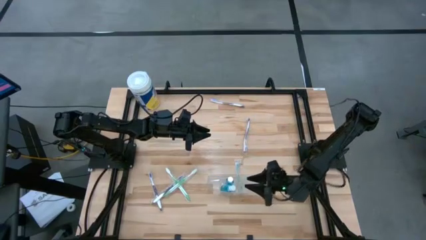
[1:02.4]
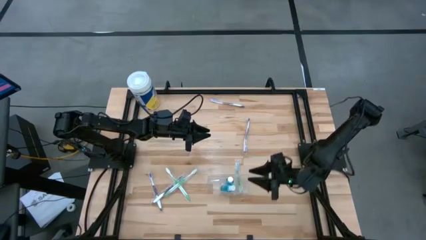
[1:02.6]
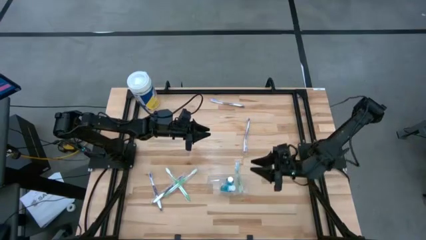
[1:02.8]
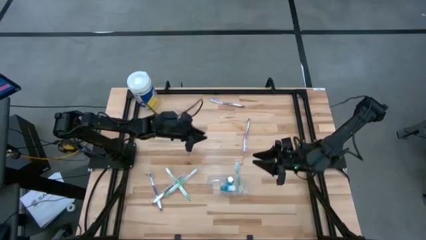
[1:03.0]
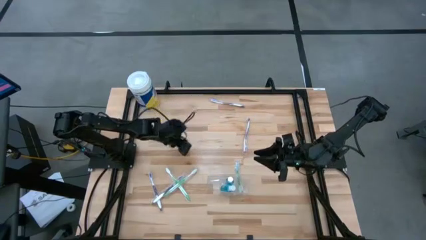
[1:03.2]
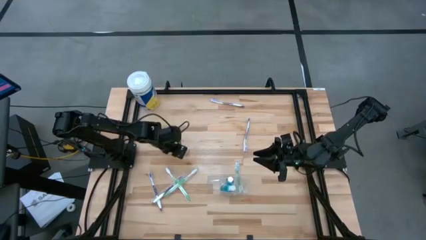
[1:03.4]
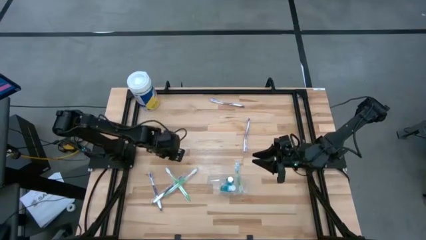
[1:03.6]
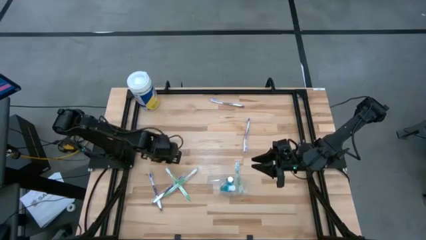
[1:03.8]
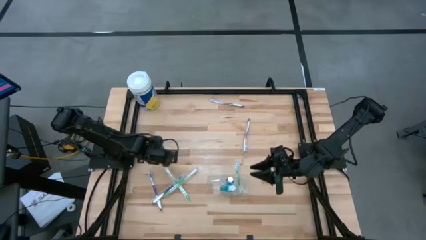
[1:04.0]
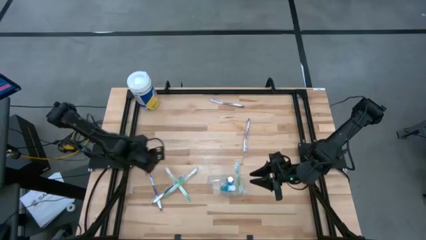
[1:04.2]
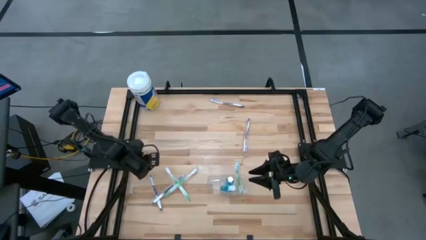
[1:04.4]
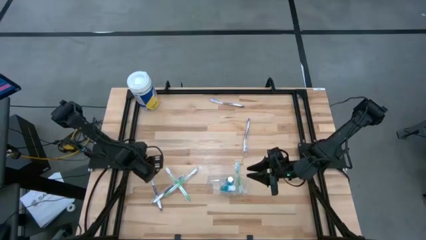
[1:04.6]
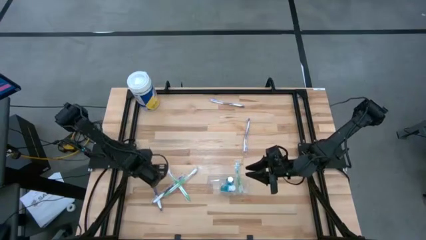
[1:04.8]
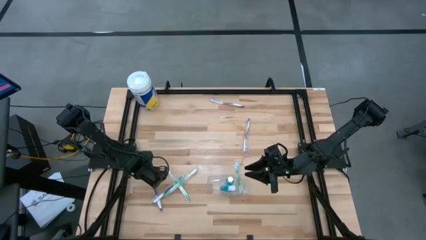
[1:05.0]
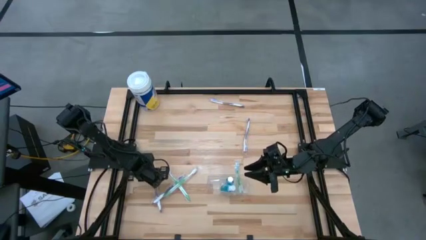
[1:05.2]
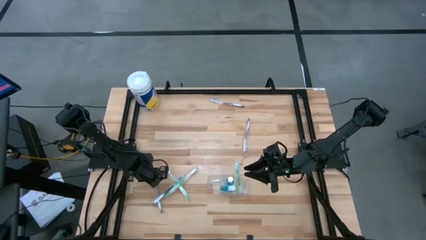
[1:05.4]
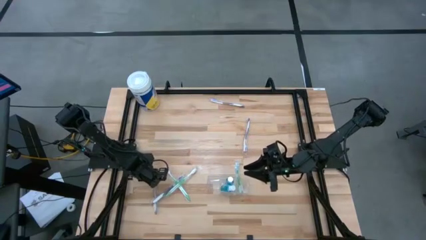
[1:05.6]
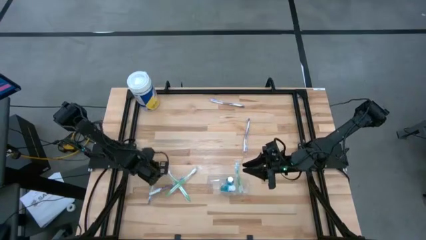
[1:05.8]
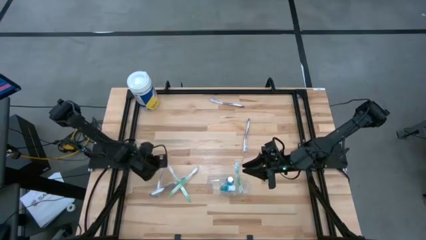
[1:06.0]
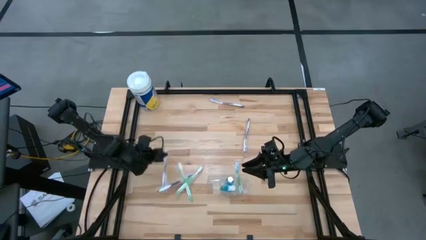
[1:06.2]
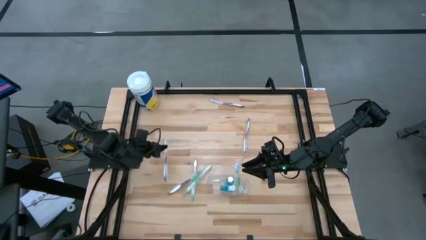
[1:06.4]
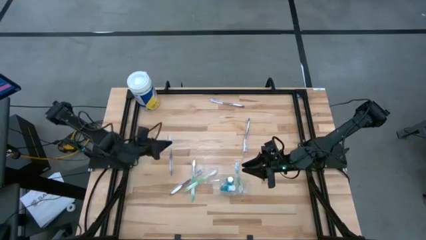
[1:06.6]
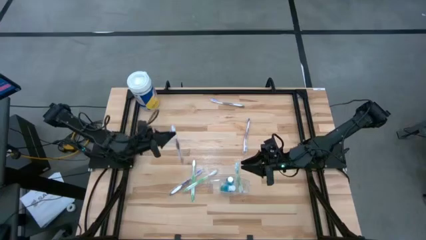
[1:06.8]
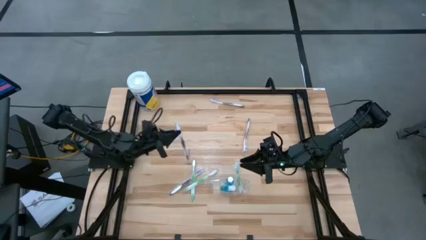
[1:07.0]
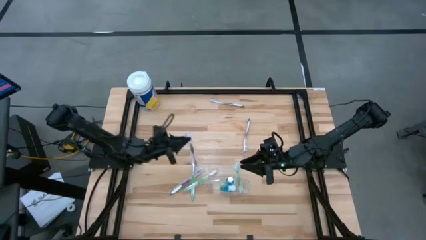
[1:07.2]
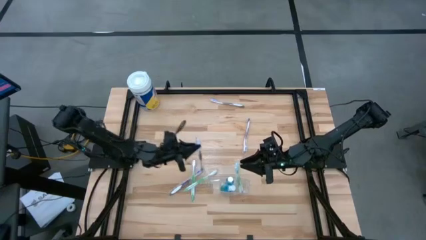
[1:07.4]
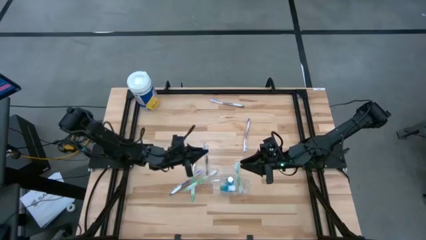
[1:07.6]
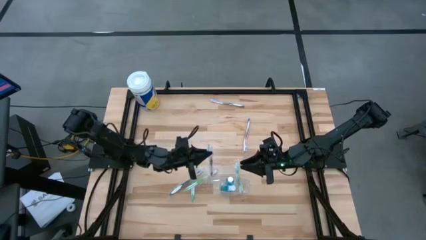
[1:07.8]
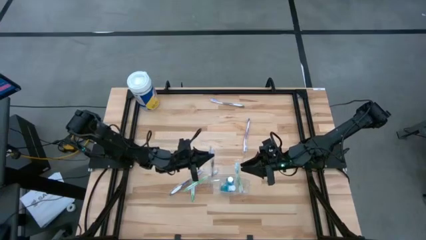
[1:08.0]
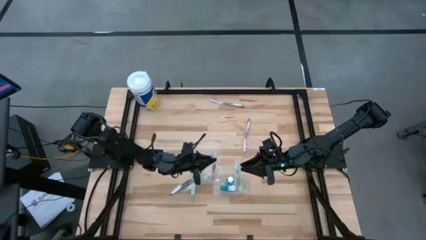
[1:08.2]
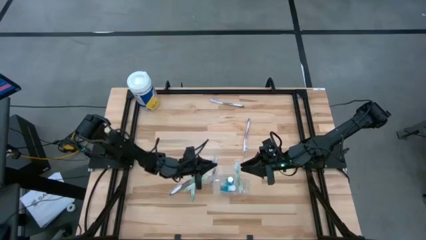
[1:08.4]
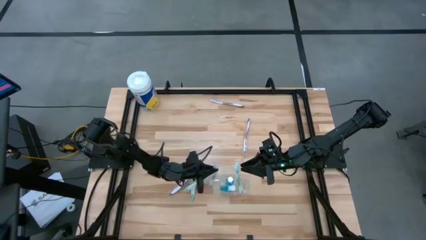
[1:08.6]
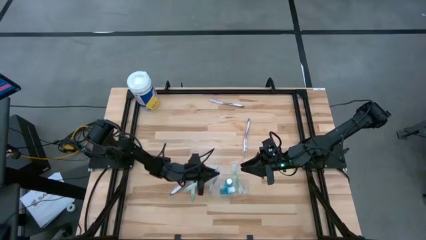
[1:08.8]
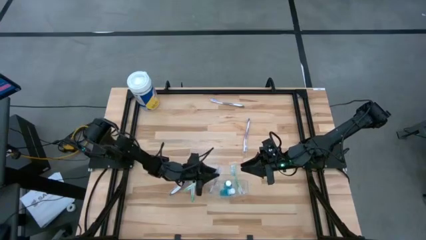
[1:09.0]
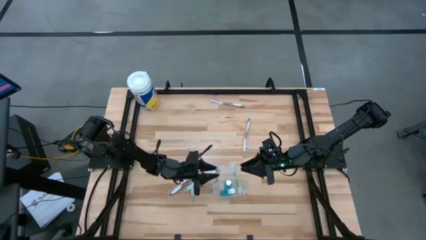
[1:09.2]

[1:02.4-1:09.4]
Task: Pick & Place toothbrushing station
Put the purple toothbrush in the transparent organizer

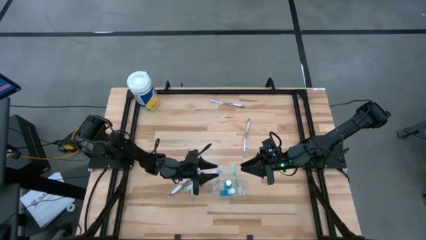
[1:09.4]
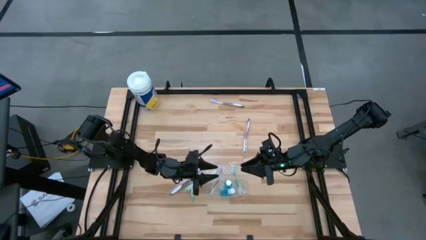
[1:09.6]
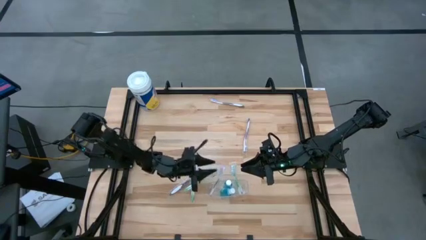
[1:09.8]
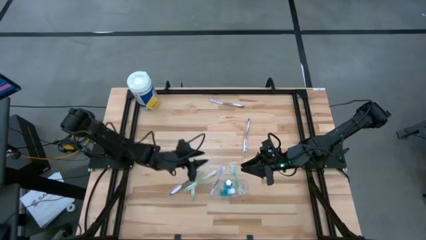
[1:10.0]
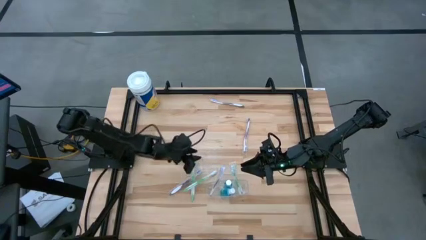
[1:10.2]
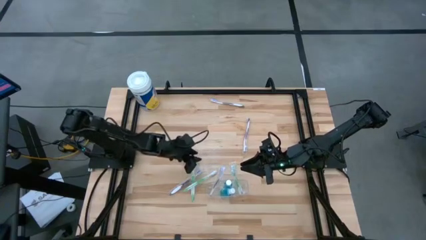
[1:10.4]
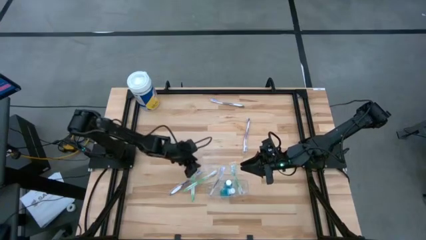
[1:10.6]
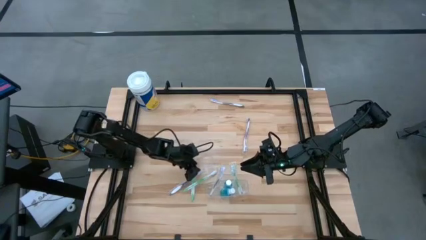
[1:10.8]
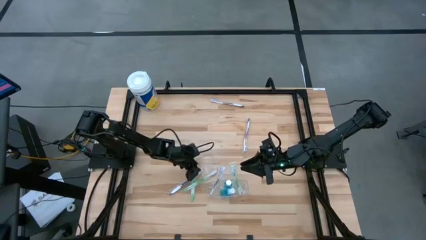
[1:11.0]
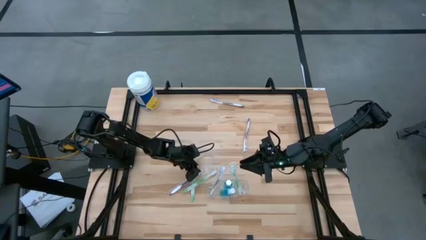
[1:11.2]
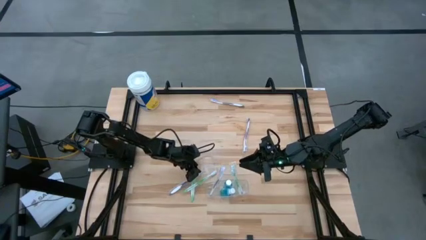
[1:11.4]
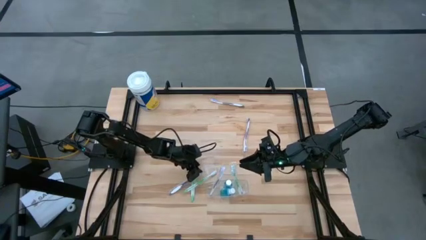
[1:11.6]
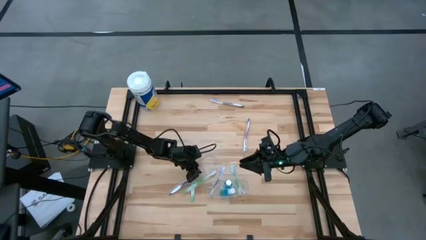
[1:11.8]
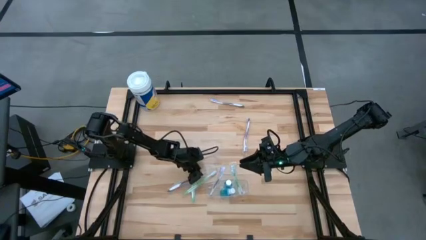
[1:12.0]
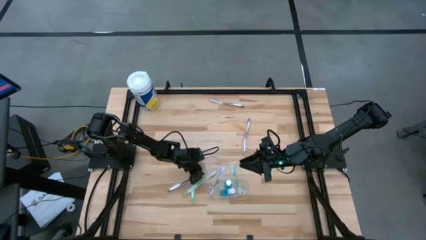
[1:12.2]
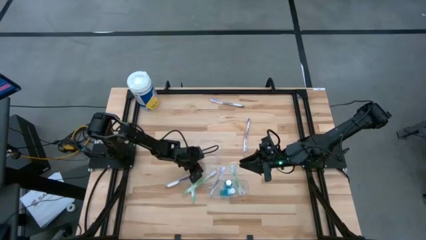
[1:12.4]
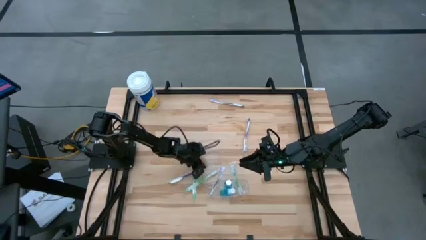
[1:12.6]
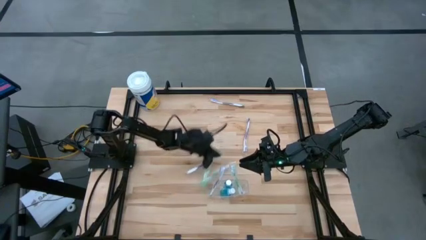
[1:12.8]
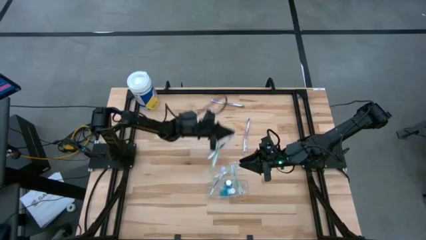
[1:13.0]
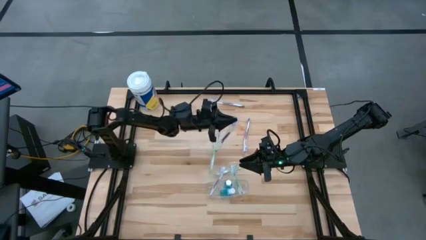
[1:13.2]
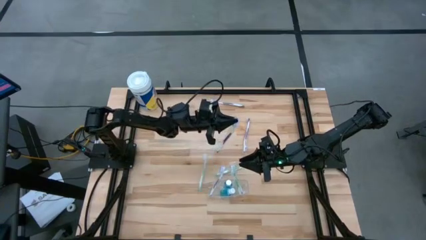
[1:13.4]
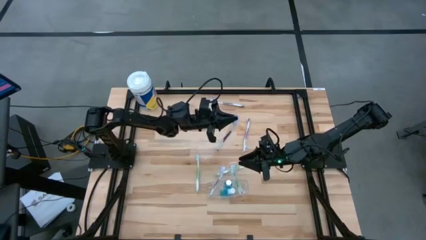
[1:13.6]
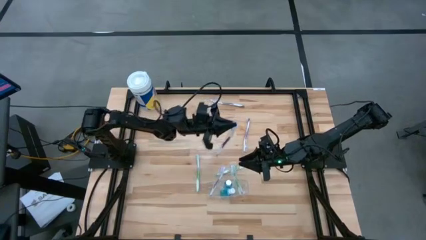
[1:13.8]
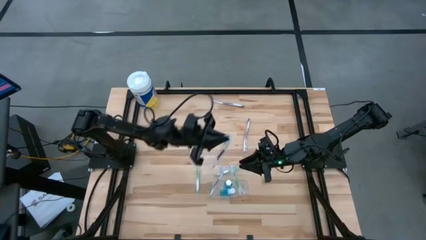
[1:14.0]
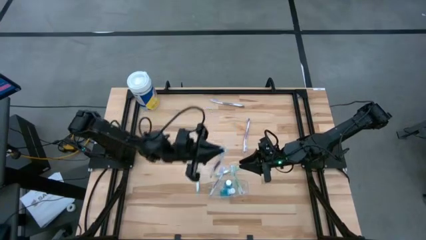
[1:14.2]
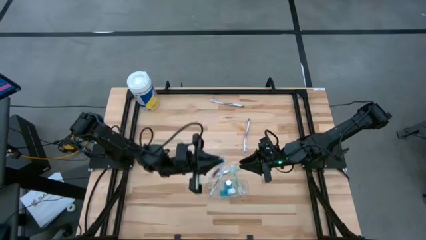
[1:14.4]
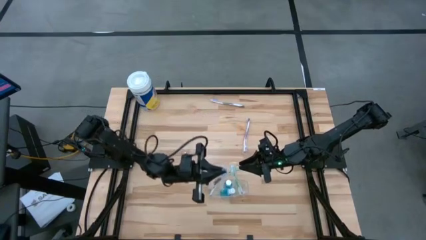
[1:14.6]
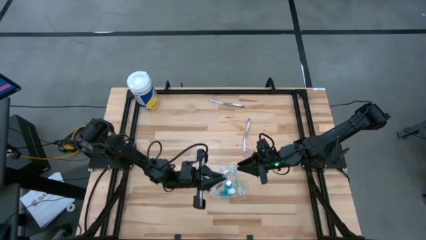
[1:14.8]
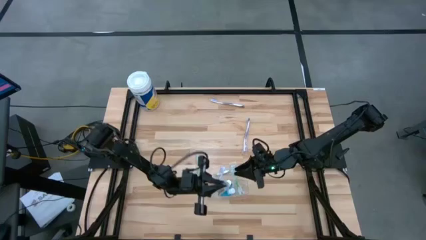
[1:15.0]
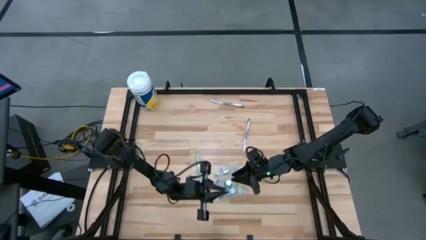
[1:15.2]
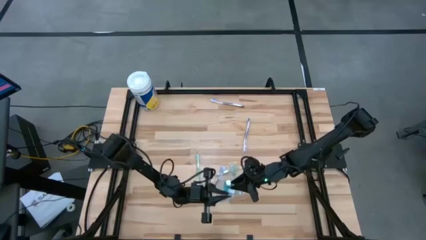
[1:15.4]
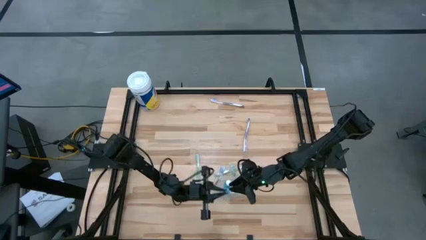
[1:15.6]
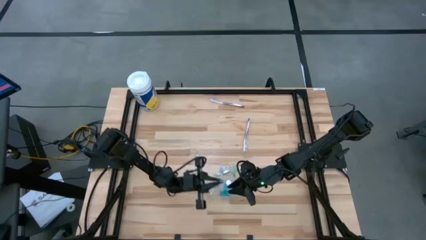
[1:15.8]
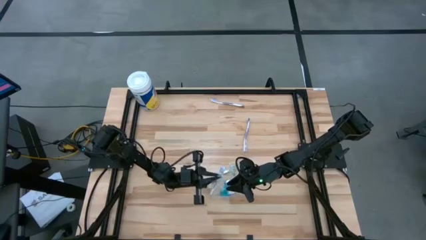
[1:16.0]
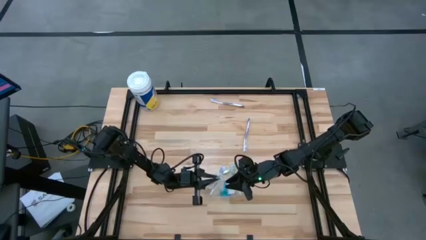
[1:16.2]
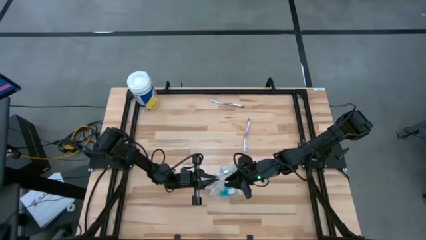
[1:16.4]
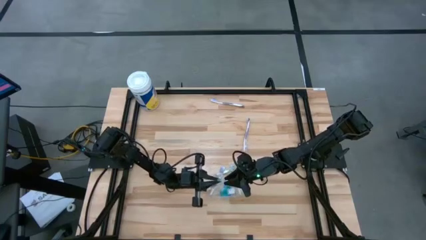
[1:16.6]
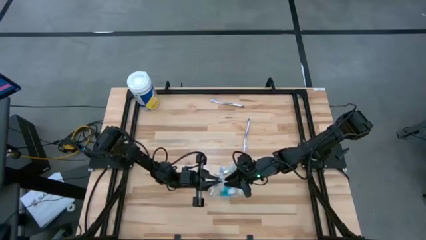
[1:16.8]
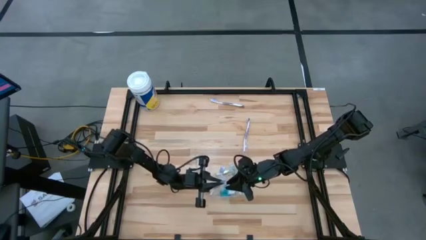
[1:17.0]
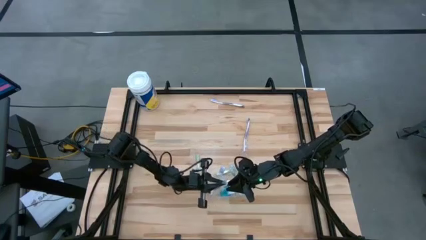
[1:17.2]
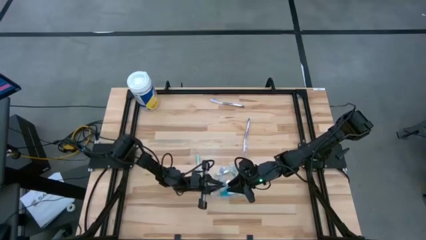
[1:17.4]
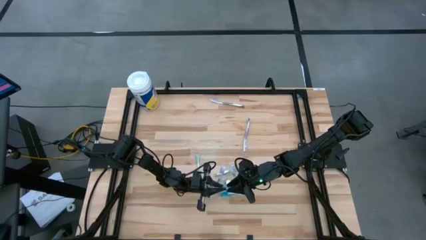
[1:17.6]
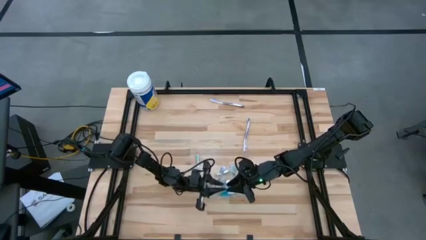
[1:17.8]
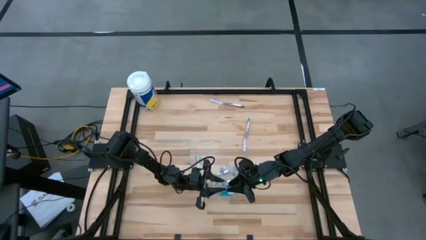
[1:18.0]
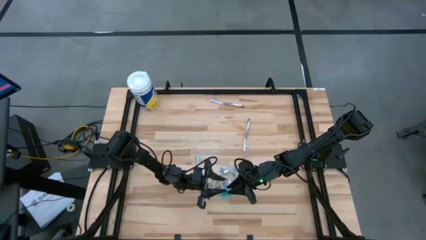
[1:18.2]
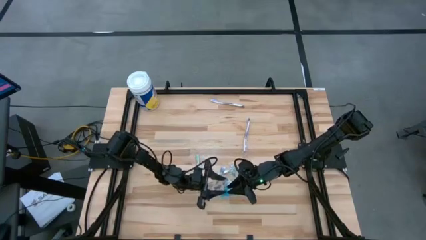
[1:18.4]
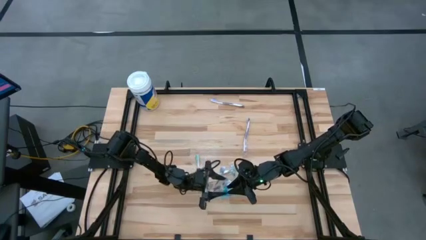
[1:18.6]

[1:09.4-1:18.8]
Put the purple toothbrush in the transparent organizer
